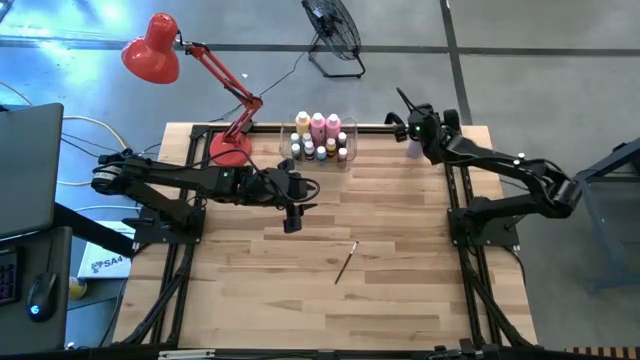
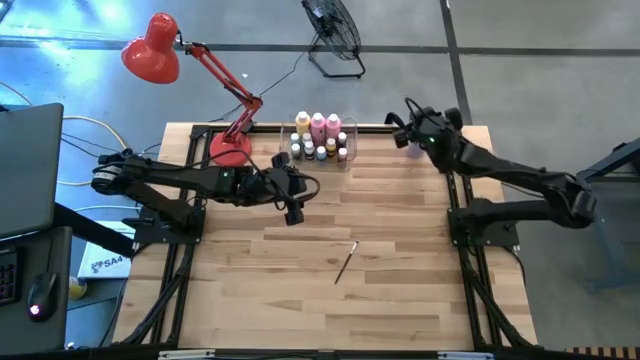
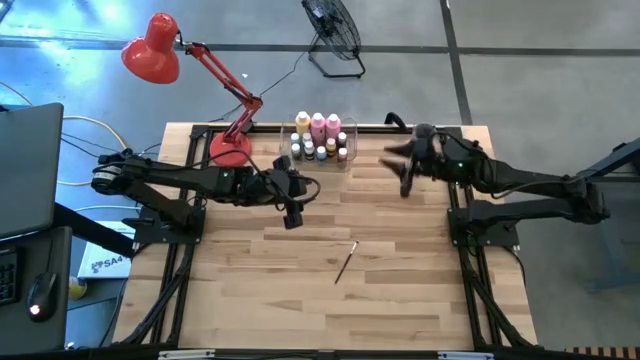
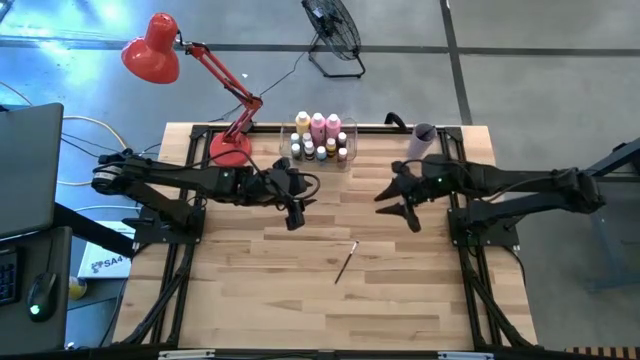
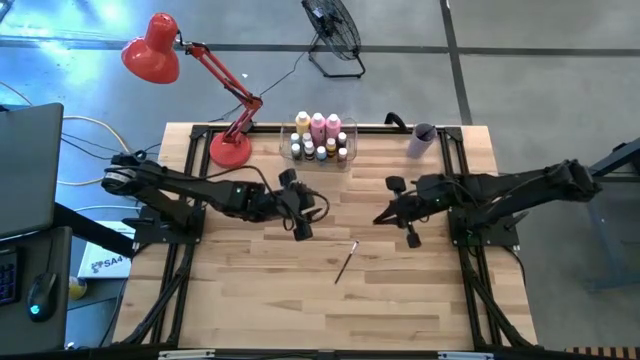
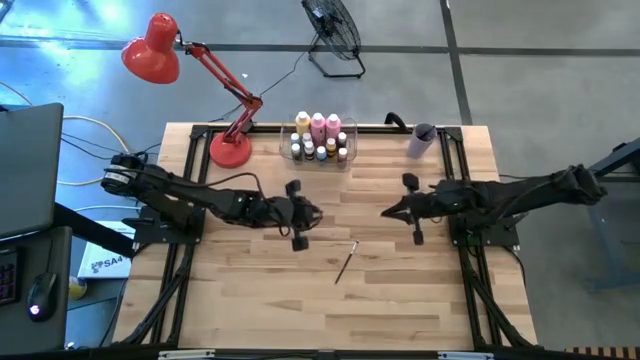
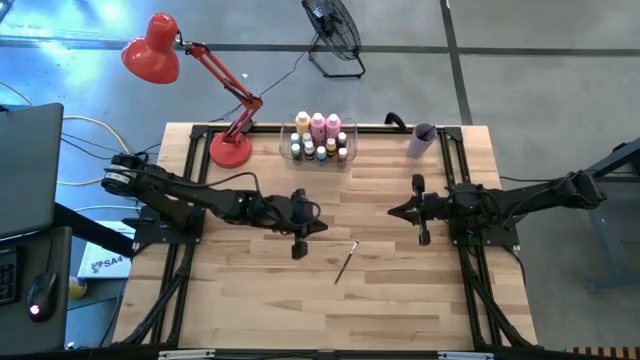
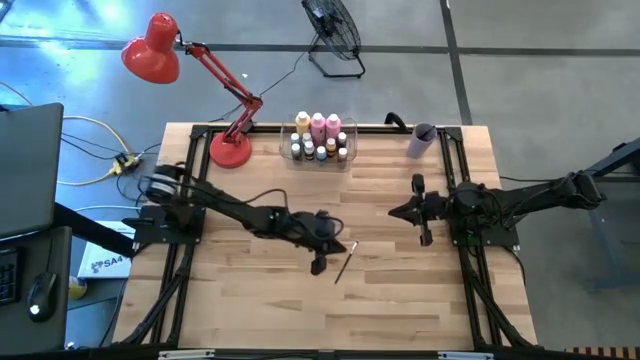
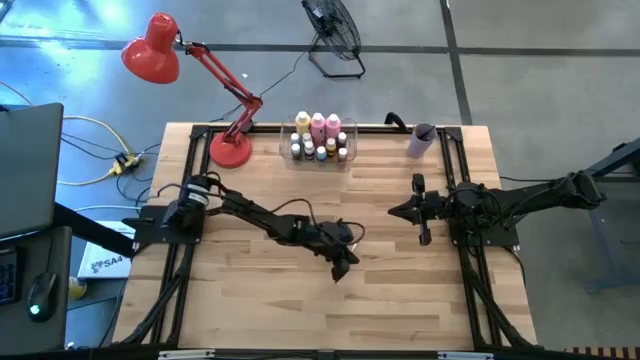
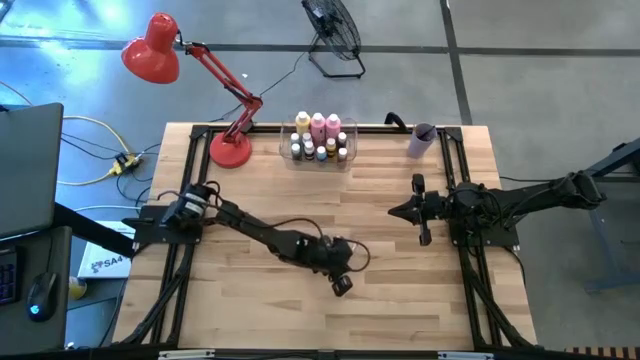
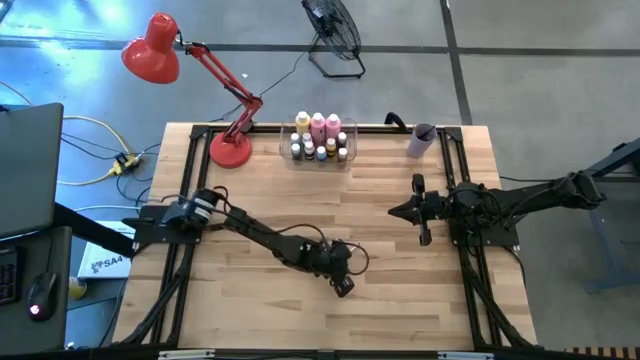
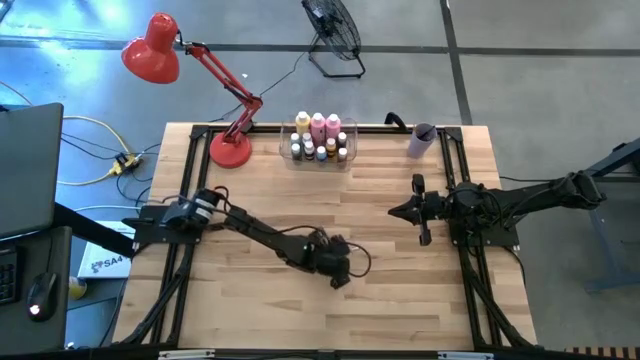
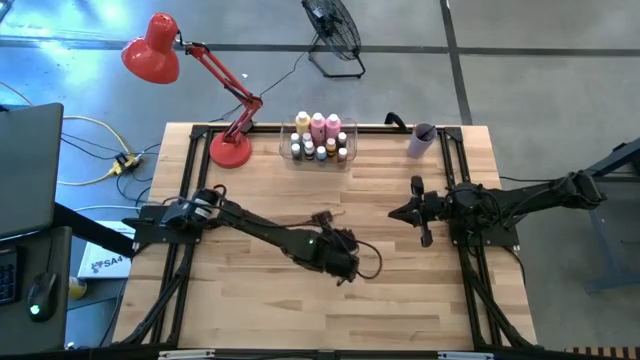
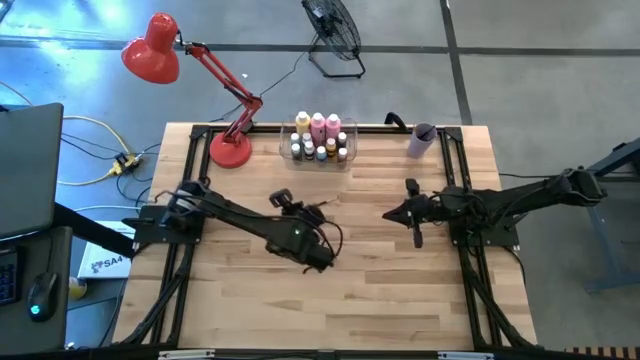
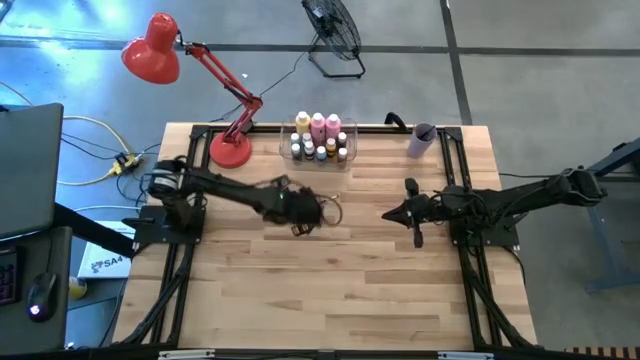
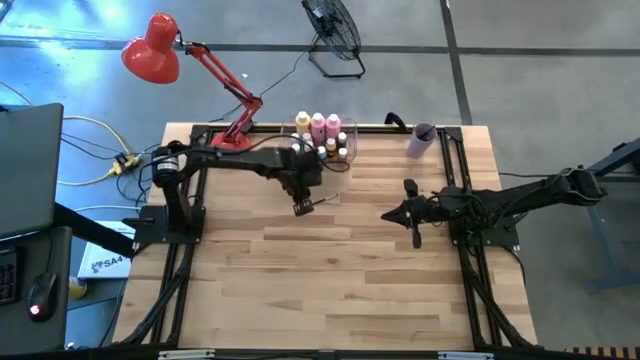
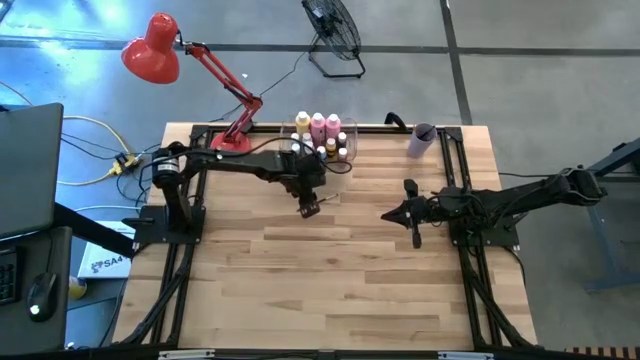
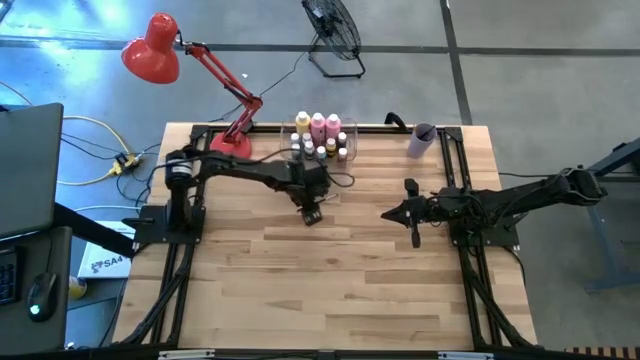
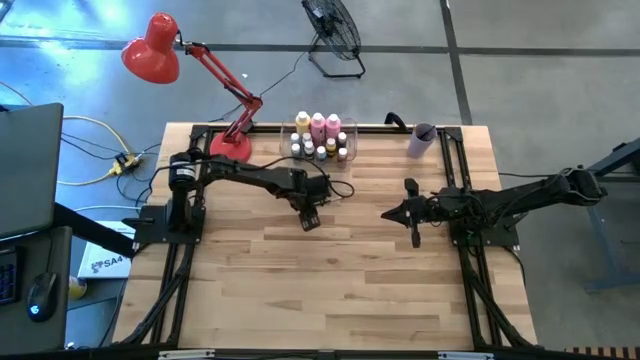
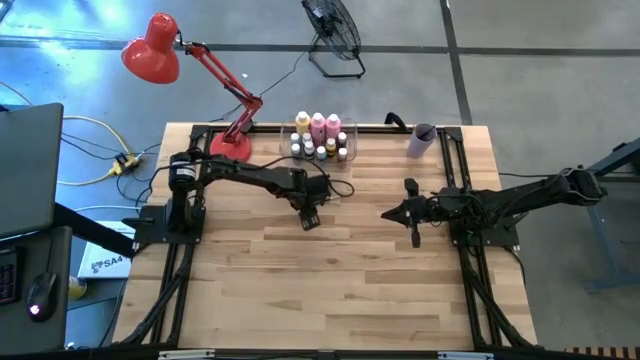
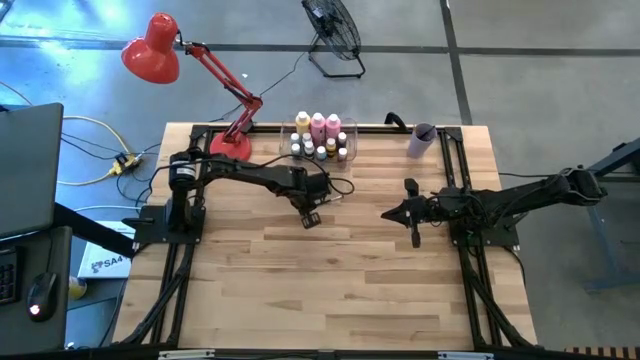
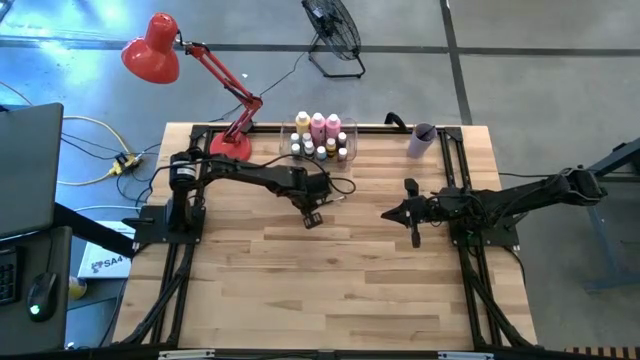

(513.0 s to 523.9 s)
Task: Pick & Place Paint Supplies
Put the black paint brush into the violet cup

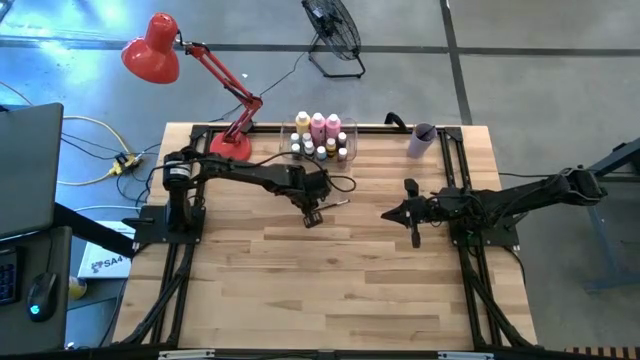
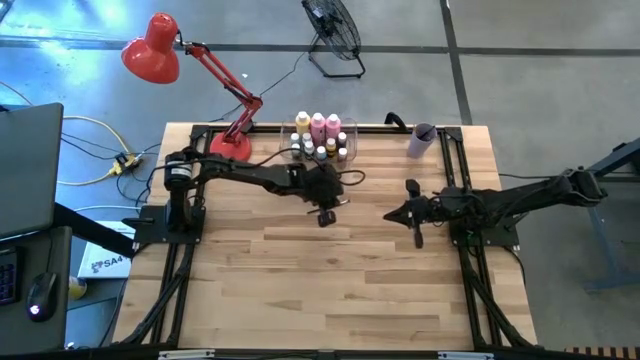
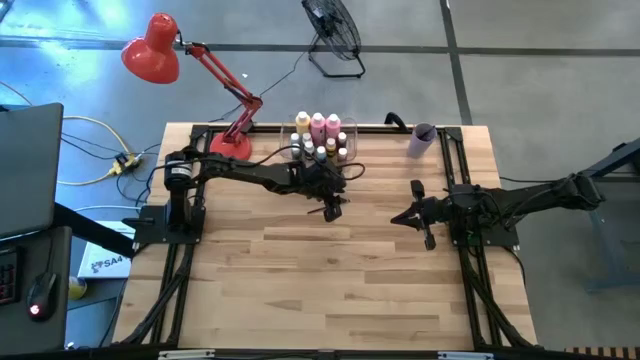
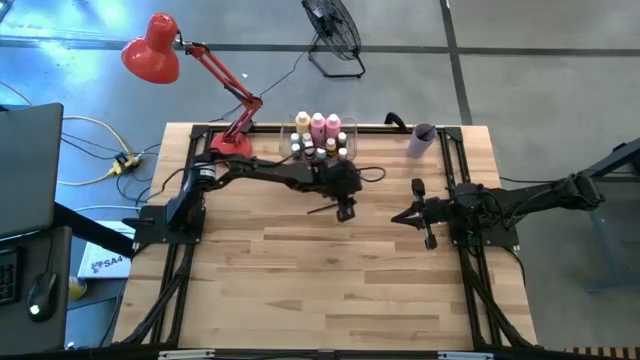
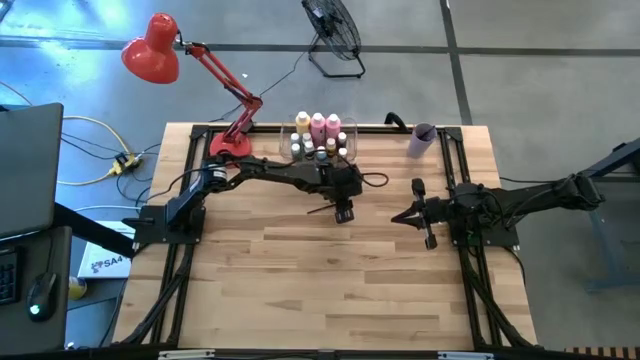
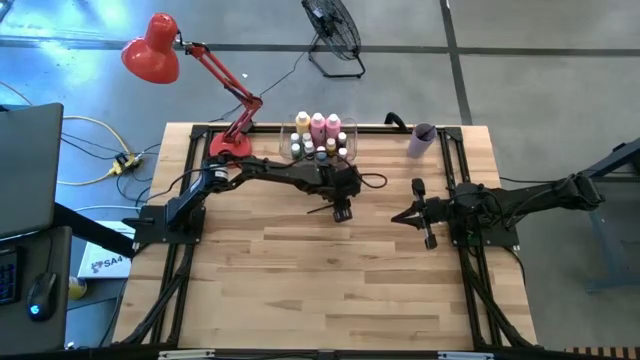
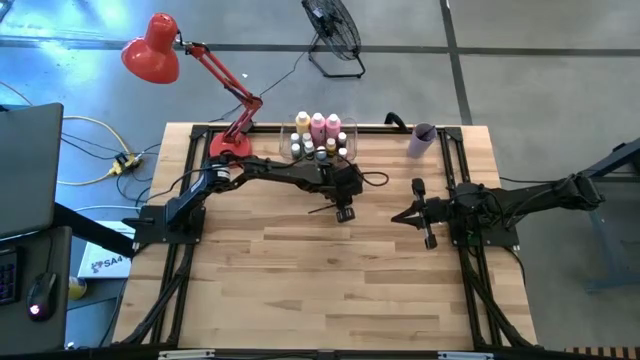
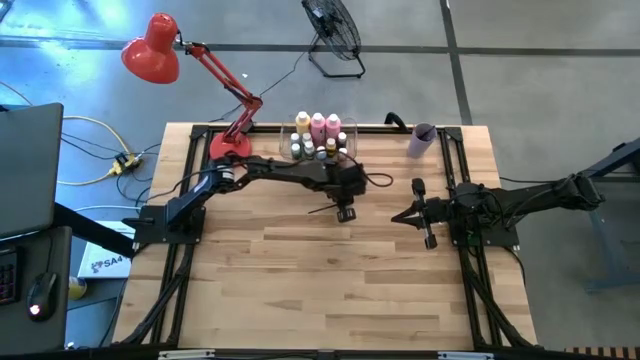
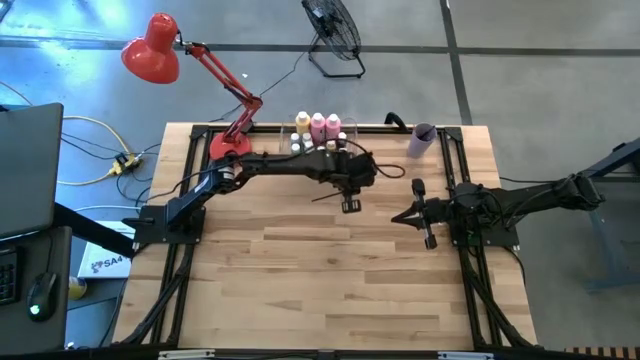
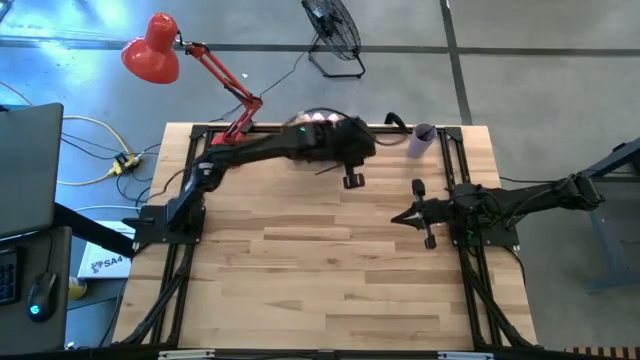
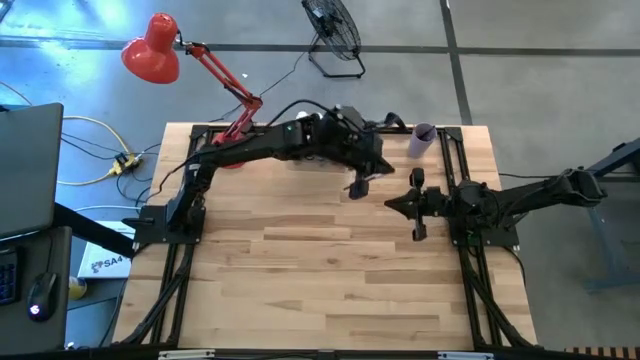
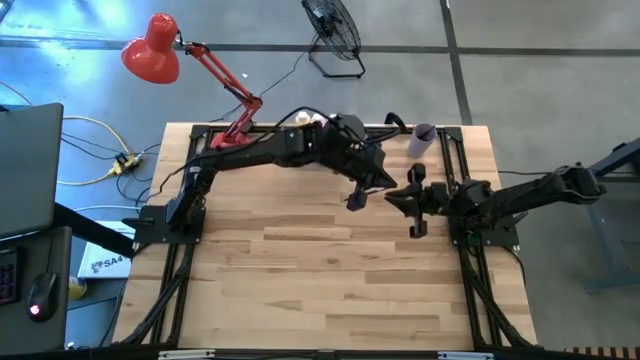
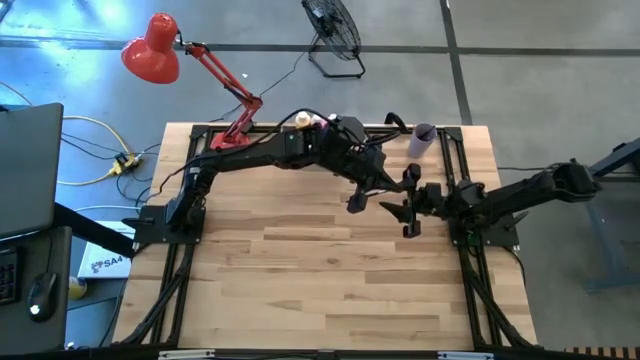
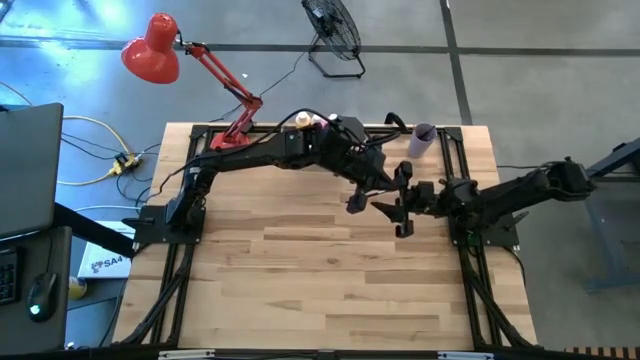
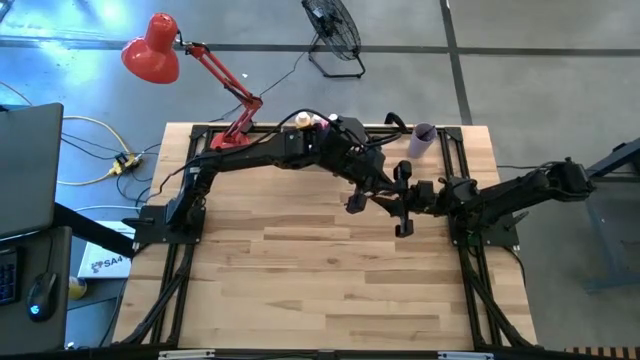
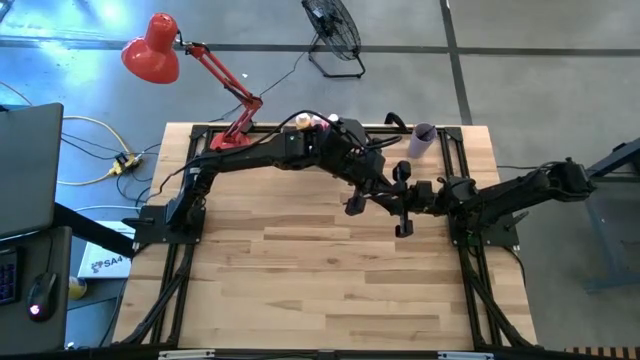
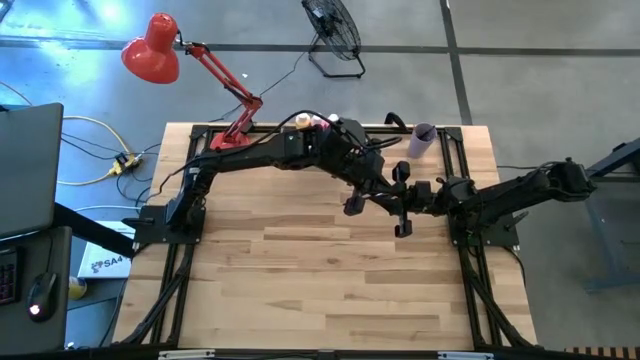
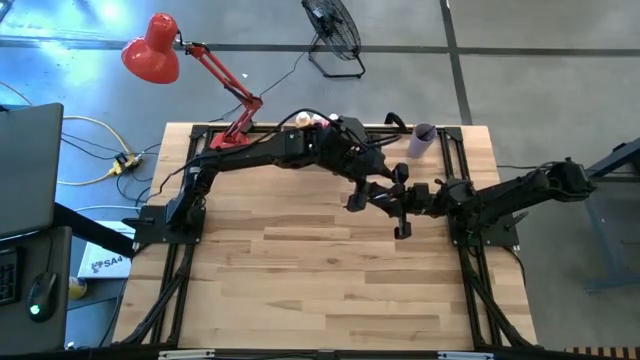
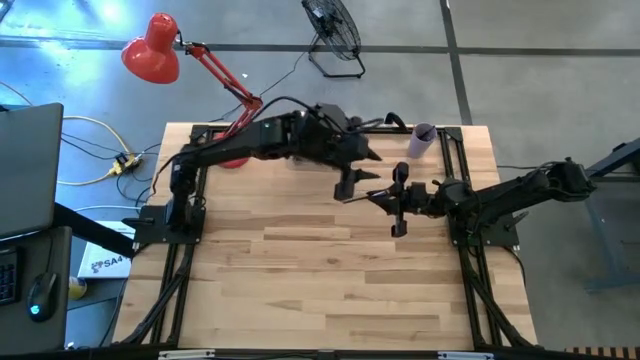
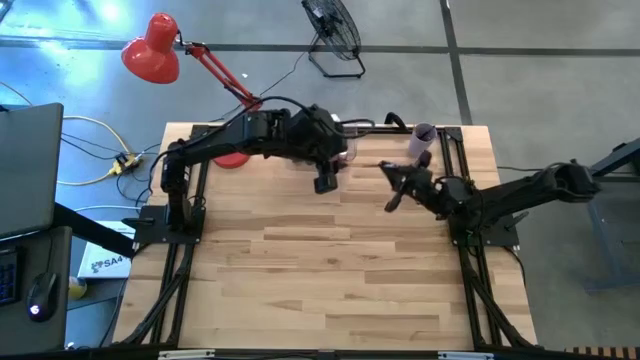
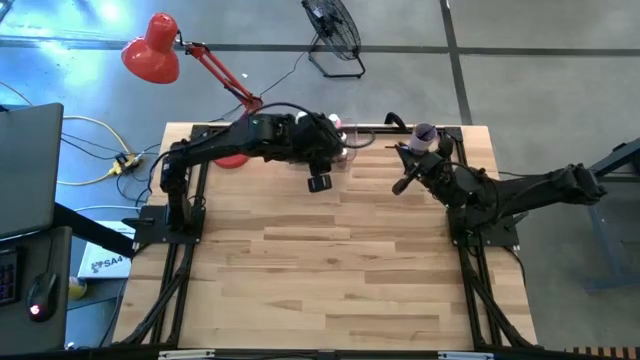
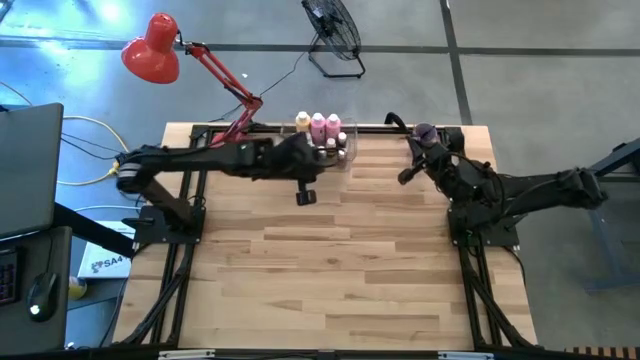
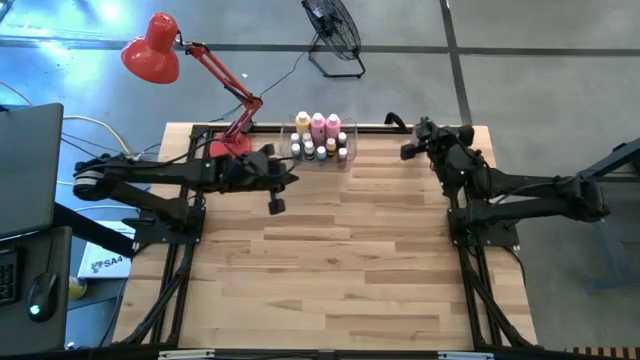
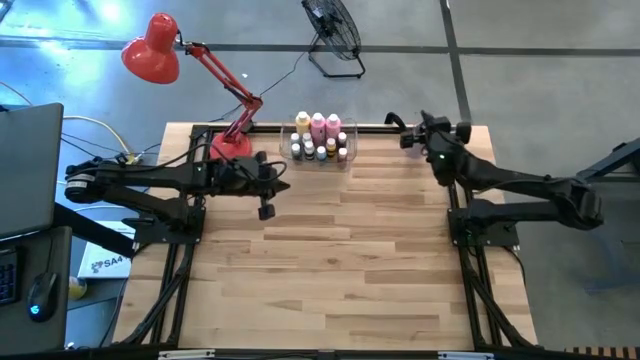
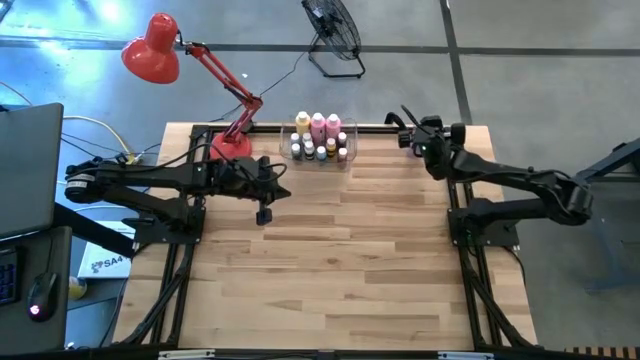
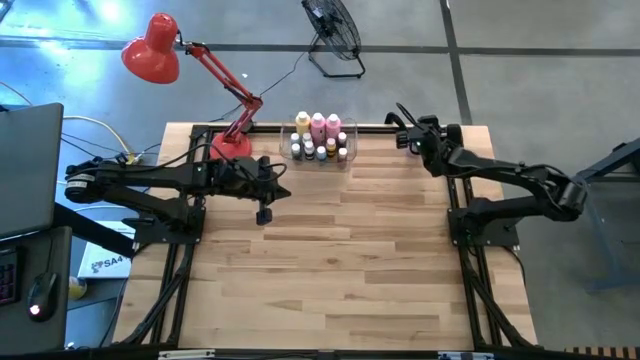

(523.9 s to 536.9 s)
Put the black paint brush into the violet cup
